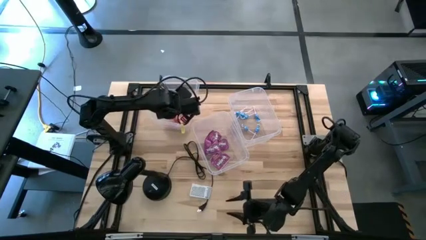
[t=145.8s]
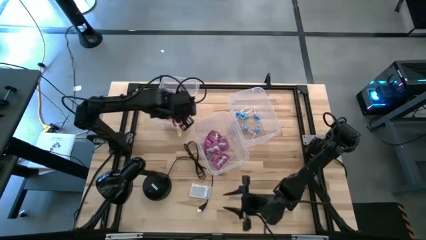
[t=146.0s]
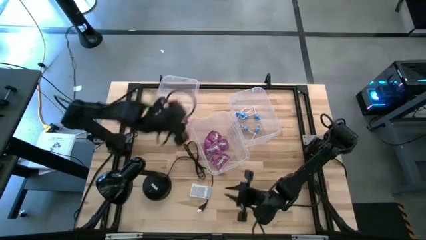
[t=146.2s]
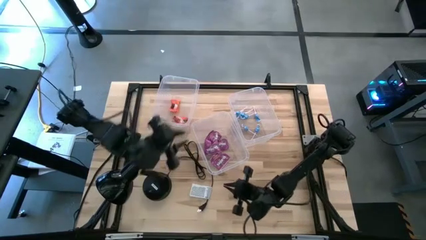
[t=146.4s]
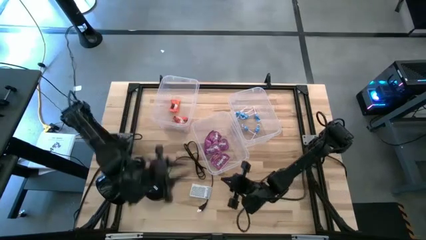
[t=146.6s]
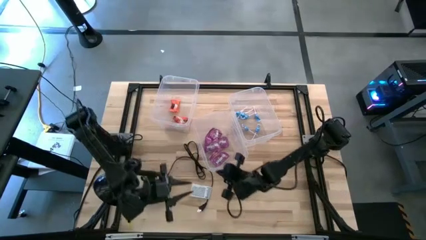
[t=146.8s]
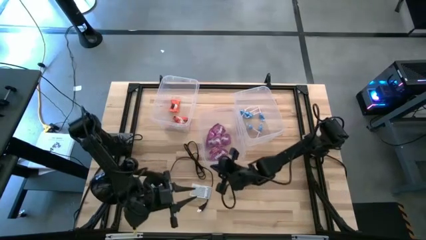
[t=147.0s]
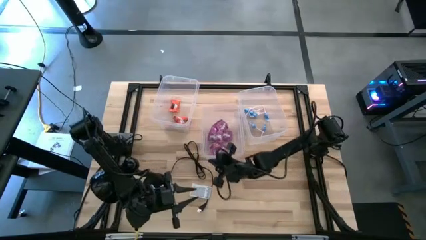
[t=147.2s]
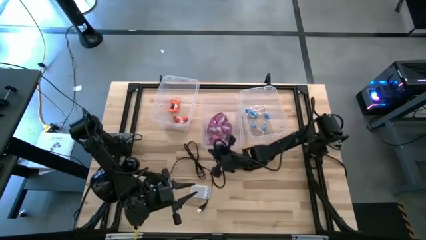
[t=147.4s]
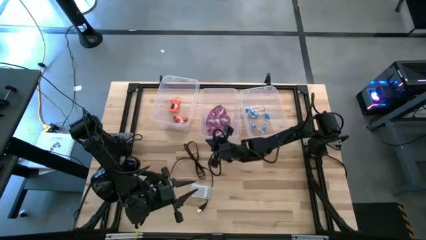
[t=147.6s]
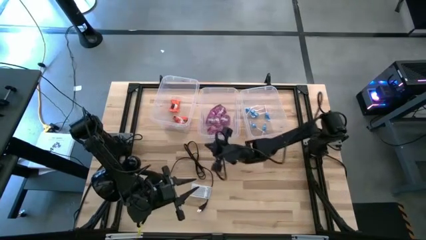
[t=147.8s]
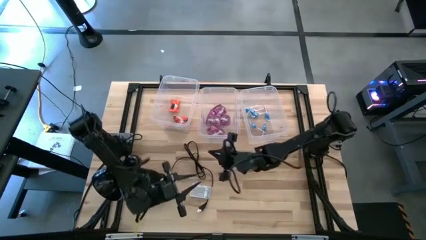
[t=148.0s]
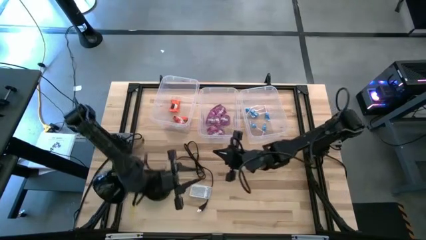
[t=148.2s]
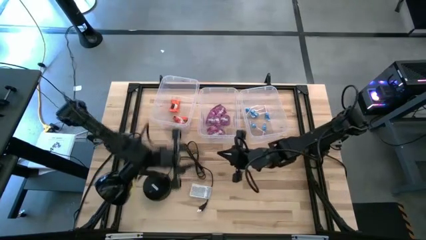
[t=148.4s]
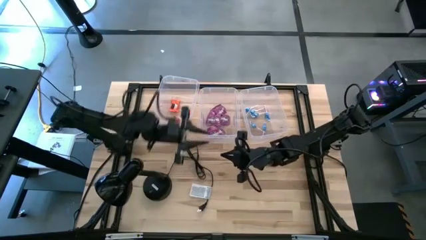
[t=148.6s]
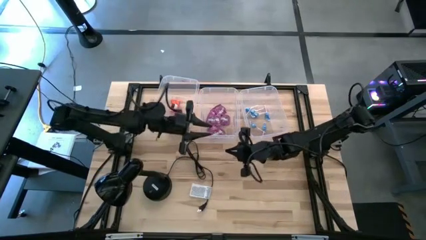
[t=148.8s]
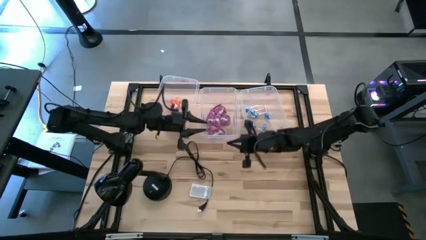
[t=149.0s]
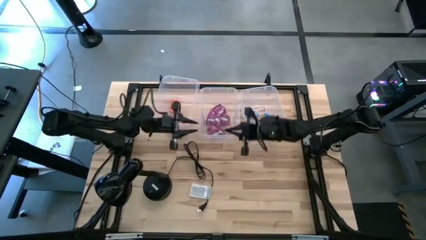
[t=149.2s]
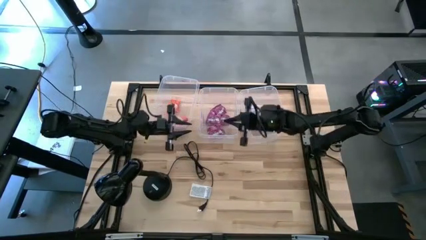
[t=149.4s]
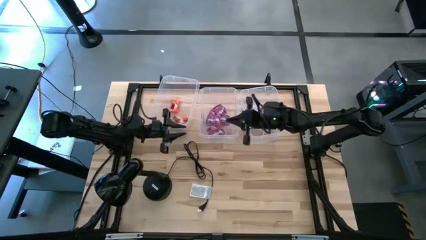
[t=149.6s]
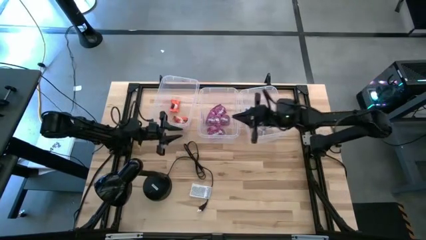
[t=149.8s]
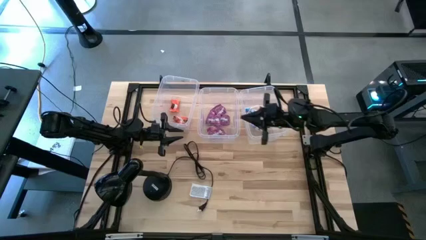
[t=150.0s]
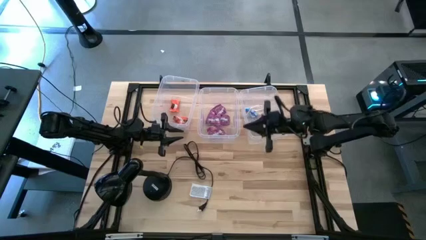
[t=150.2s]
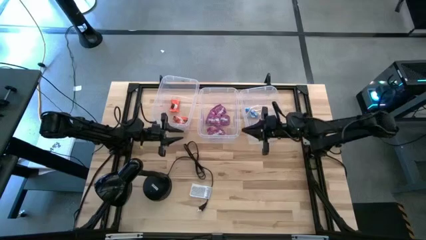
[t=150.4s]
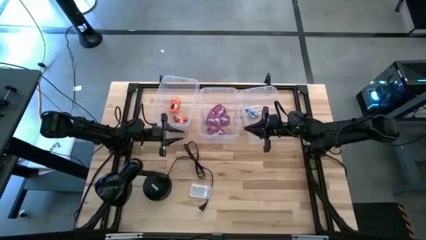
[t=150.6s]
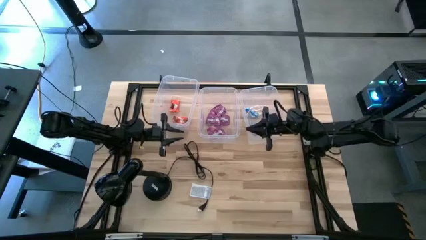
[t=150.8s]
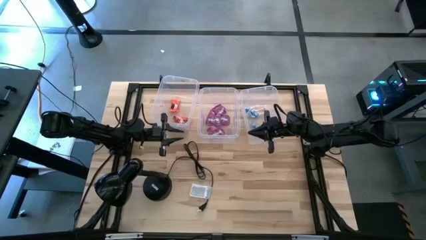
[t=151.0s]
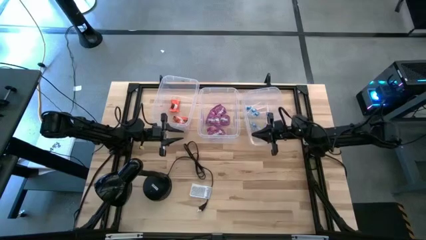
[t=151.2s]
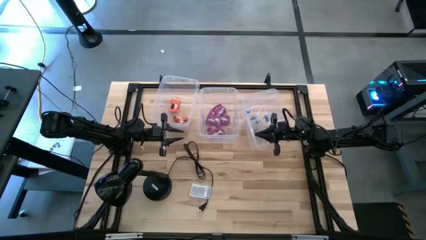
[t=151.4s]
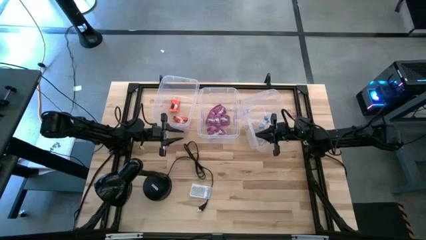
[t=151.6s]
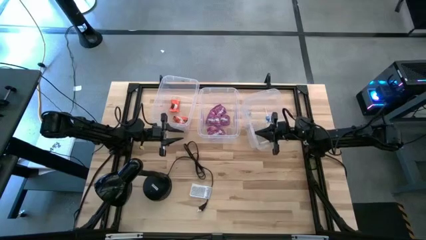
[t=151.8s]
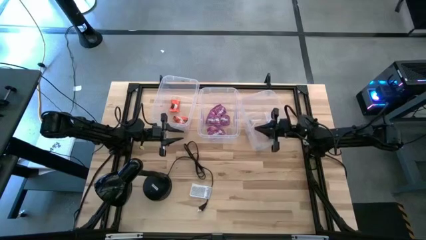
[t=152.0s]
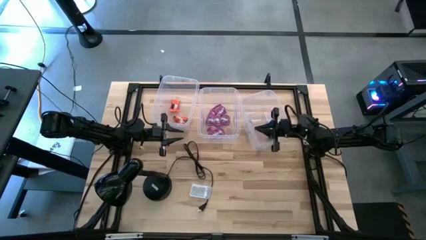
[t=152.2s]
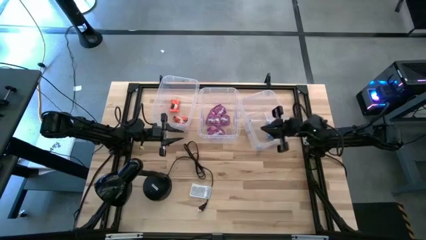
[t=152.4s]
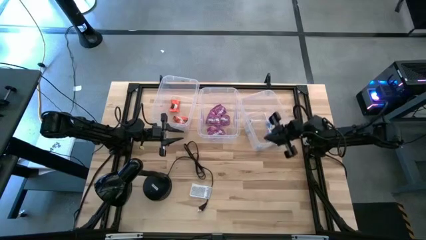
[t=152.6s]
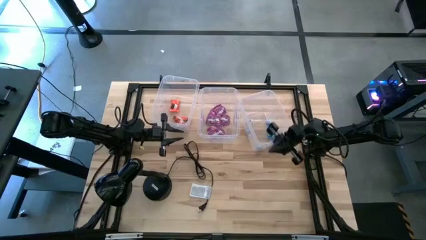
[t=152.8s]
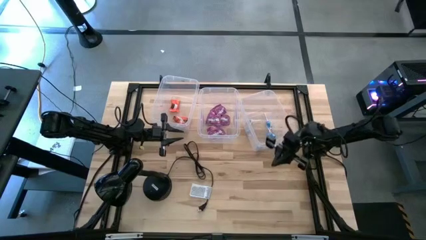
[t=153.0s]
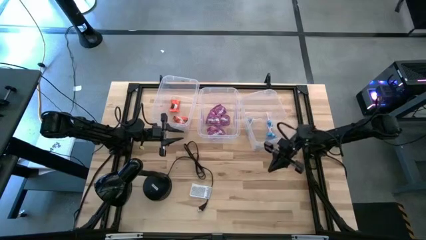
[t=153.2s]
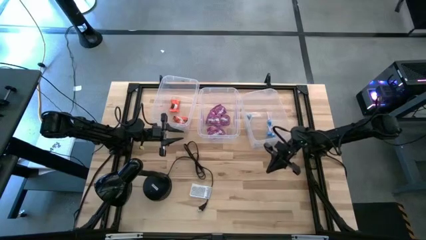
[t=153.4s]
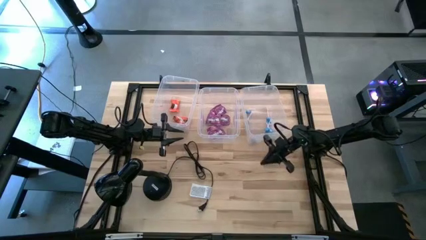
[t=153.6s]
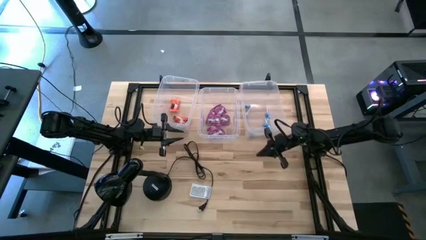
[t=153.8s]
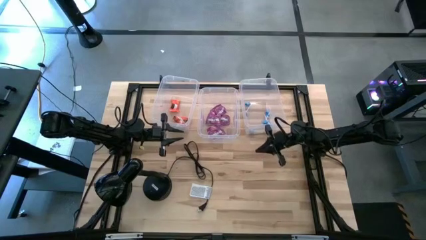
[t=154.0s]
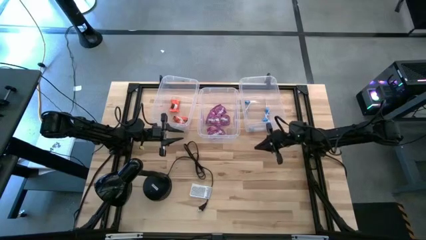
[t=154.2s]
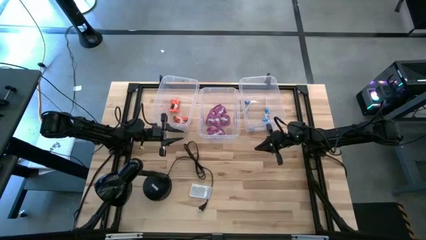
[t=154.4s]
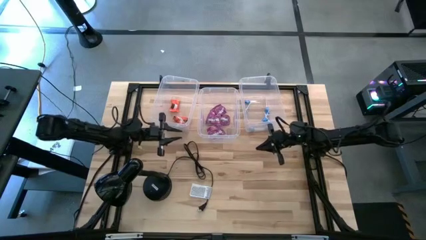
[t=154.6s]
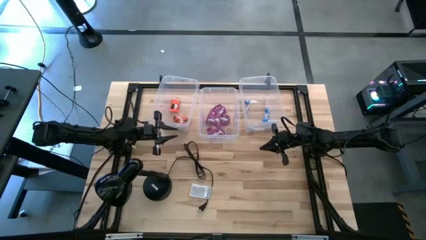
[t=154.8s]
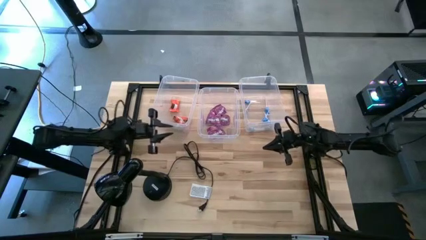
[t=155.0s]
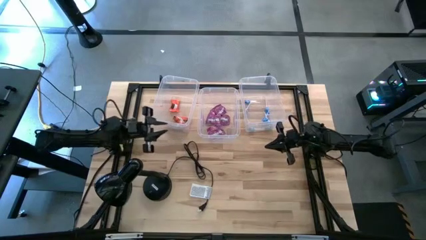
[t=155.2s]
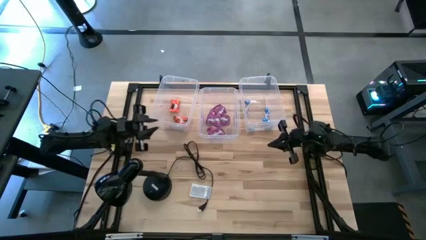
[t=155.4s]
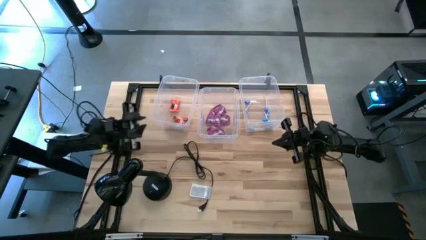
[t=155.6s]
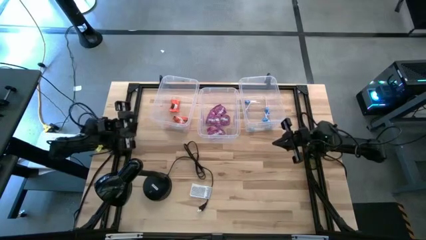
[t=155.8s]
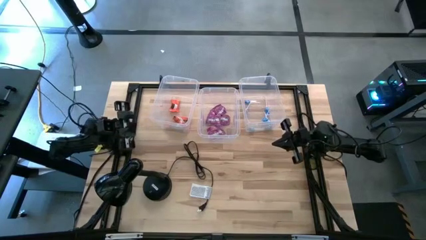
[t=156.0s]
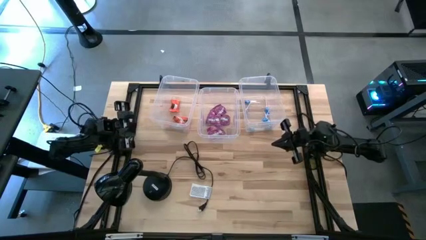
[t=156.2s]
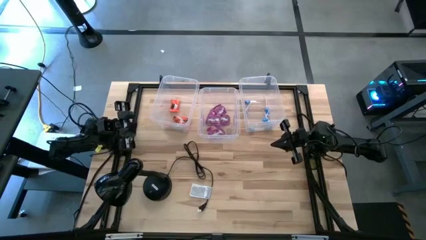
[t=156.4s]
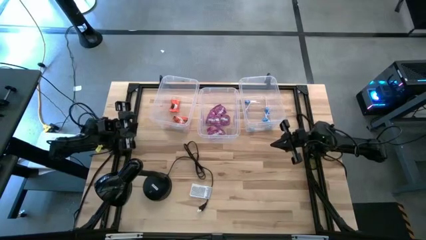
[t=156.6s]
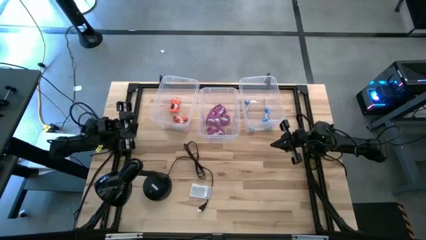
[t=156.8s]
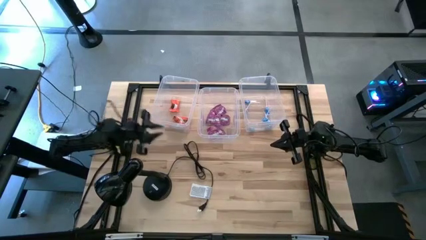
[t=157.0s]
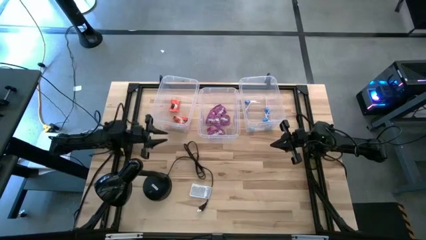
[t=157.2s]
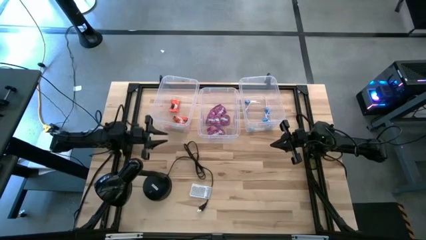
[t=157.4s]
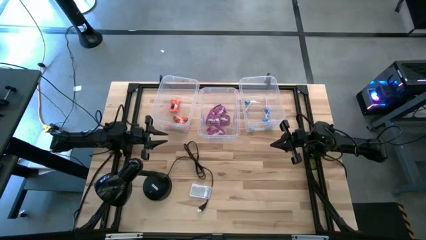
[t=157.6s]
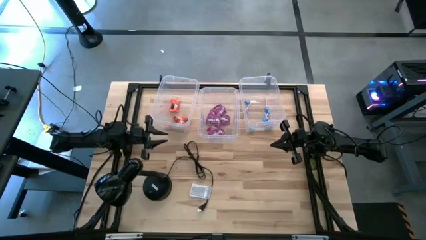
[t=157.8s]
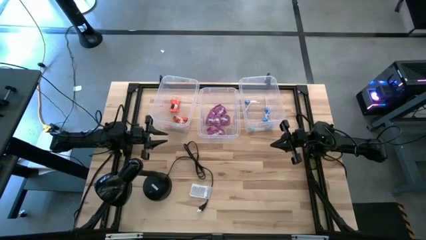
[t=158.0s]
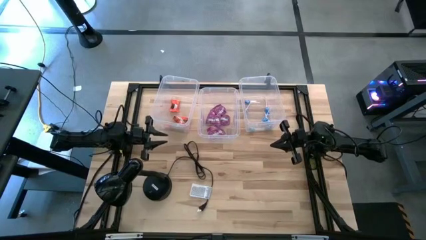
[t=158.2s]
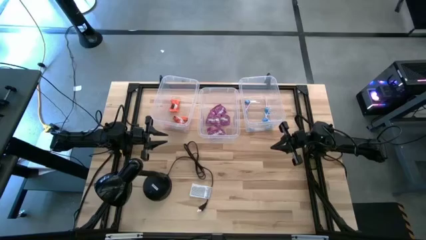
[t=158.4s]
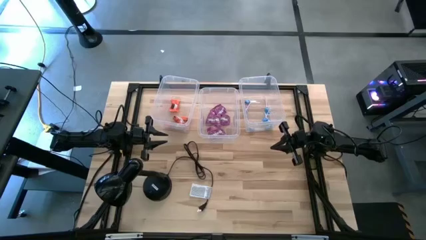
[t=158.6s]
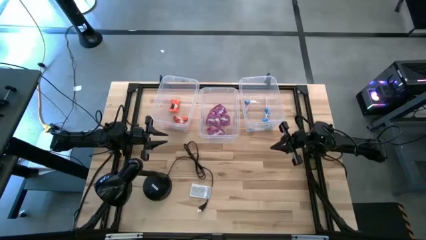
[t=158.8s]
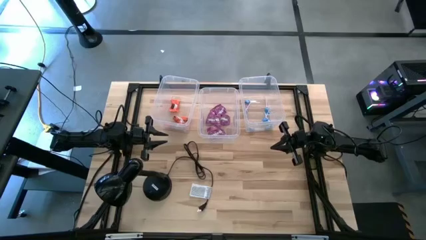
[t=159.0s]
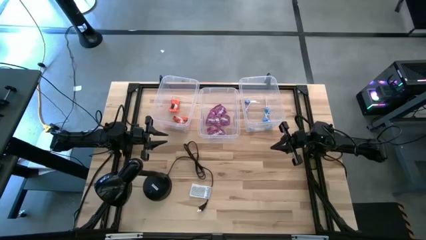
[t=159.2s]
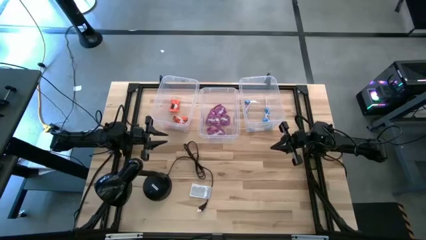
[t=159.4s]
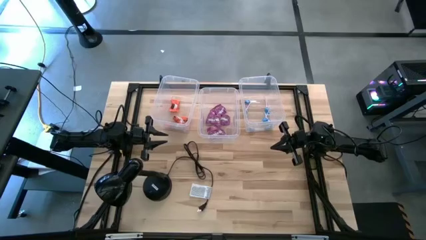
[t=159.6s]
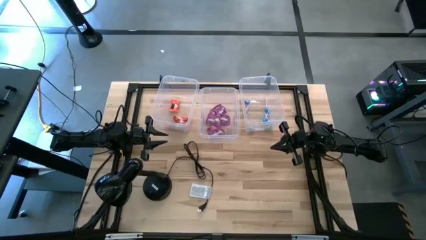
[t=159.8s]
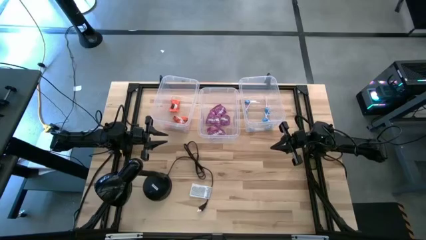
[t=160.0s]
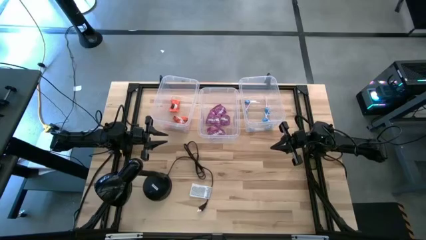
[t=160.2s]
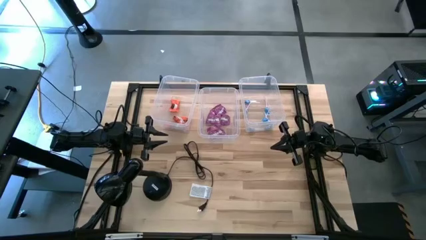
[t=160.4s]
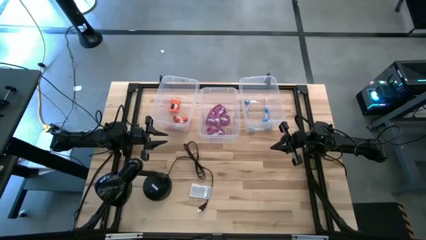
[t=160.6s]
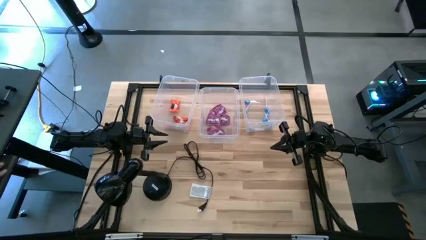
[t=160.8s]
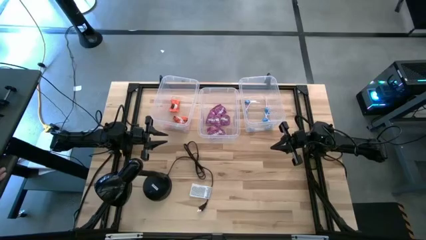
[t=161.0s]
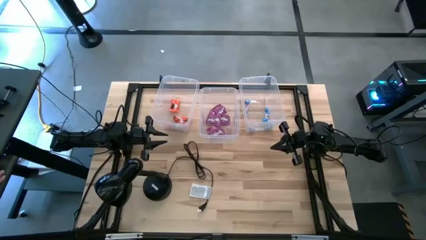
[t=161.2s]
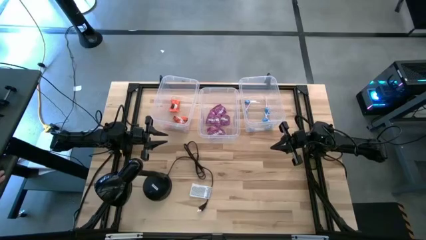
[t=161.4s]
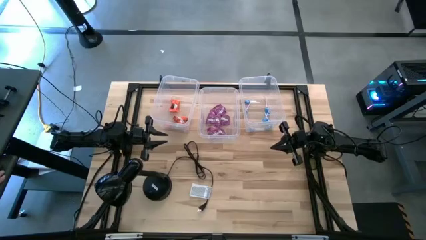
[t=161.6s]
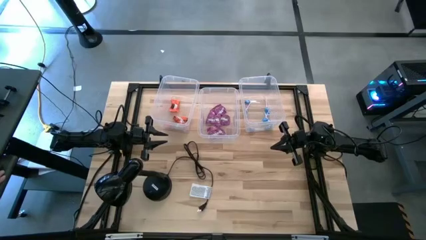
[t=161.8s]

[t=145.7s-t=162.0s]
Task: Sort candy
Return to Home Position

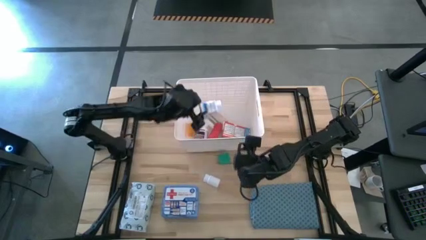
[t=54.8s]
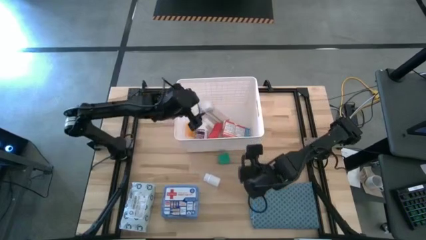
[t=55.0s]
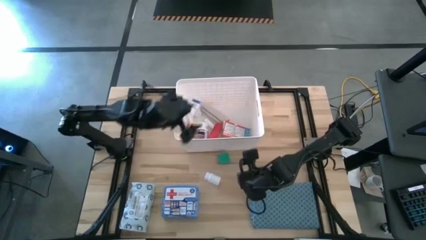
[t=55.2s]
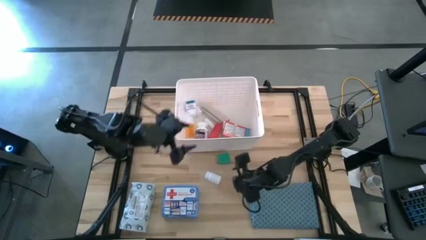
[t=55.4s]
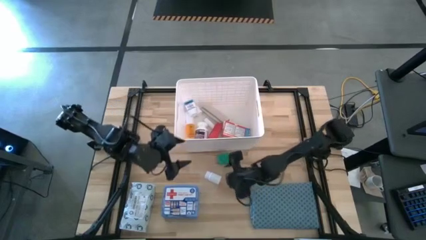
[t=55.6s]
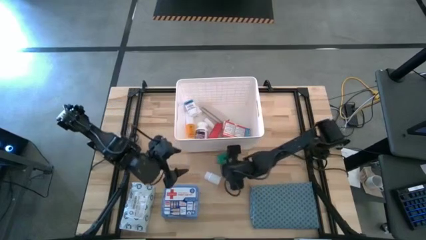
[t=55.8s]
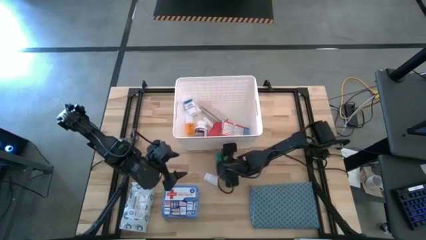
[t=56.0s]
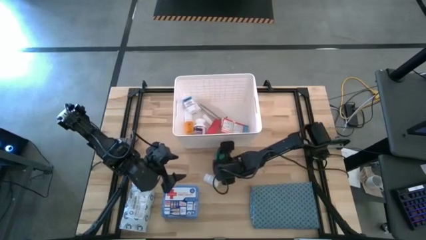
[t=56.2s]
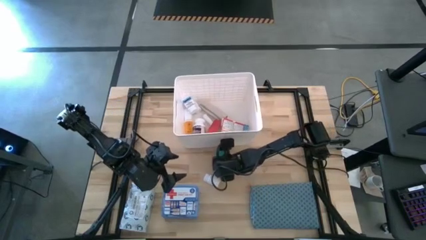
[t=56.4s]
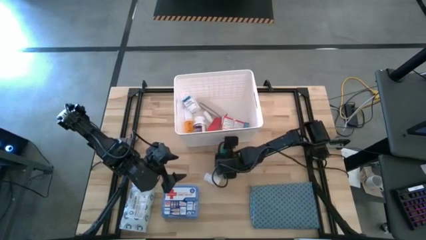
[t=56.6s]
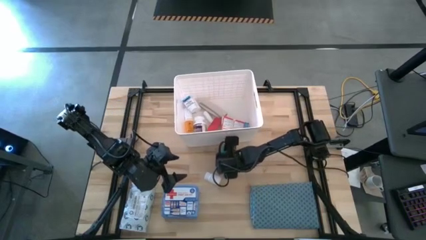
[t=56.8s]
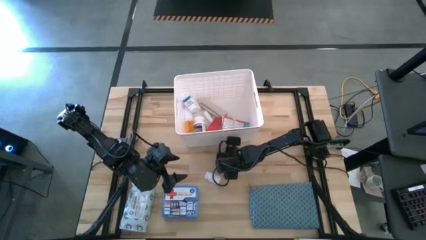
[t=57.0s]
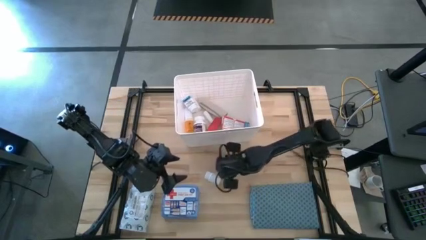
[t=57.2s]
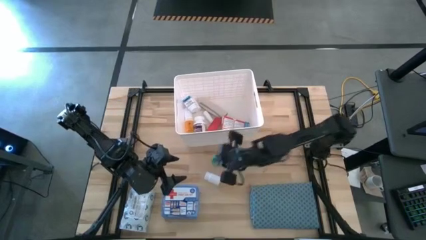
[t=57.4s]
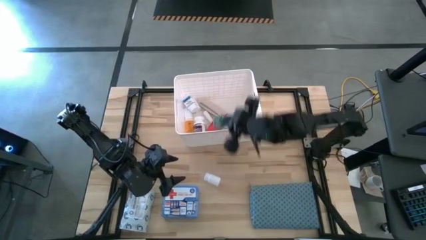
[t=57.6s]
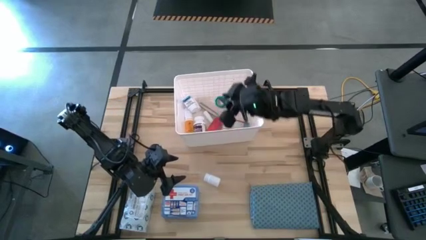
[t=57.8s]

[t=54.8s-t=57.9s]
Task: Pick & place medical supplies in basket/bin
Put the green bandage into the white bin
